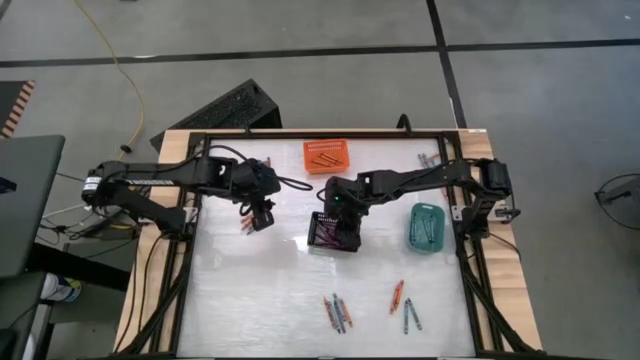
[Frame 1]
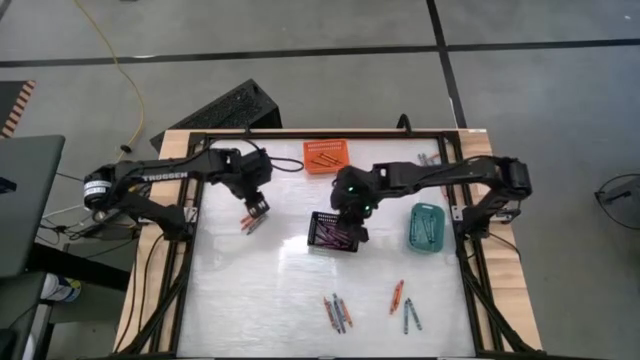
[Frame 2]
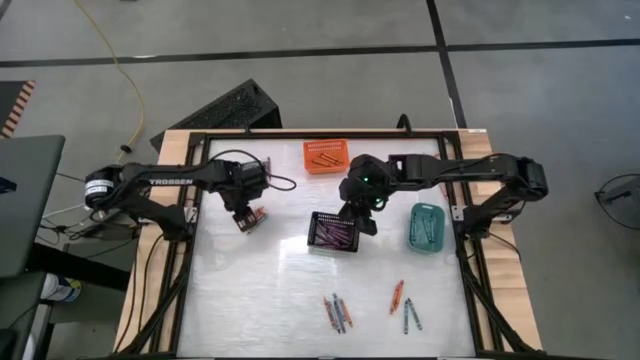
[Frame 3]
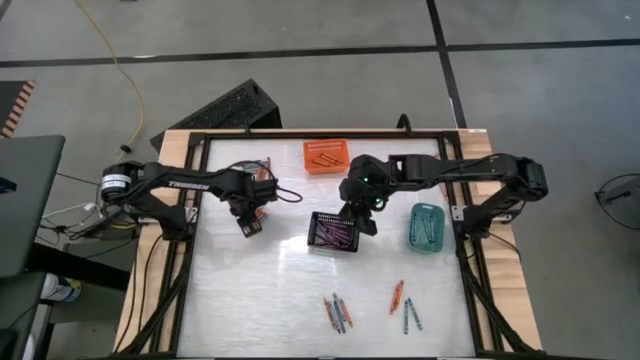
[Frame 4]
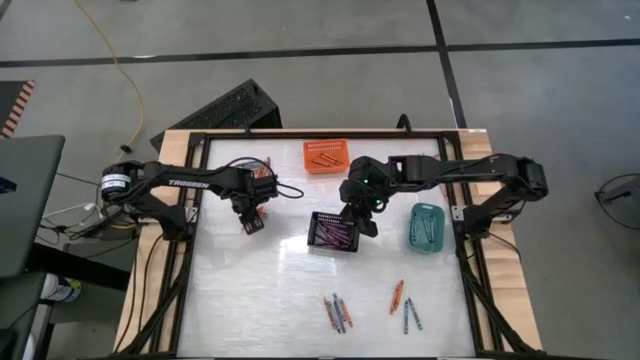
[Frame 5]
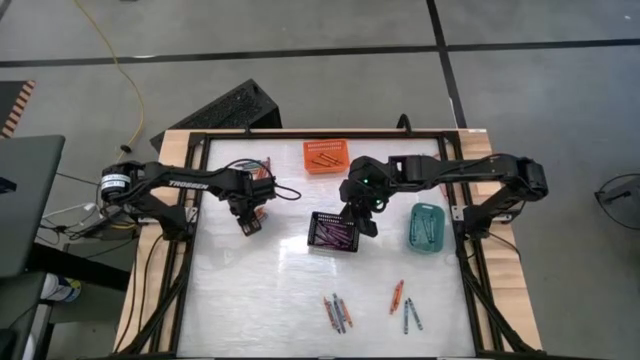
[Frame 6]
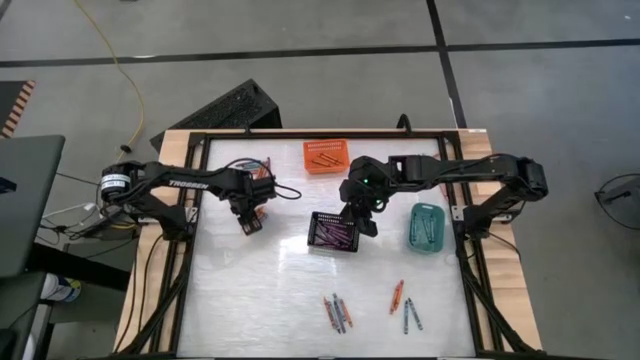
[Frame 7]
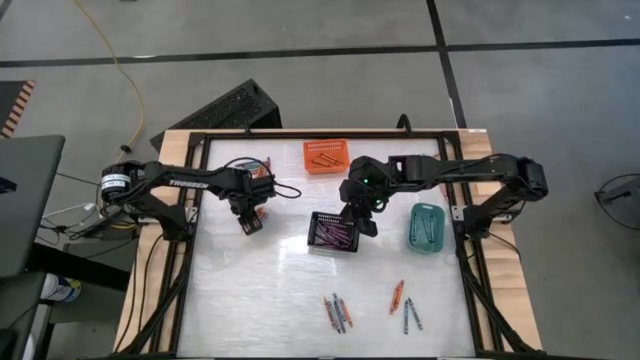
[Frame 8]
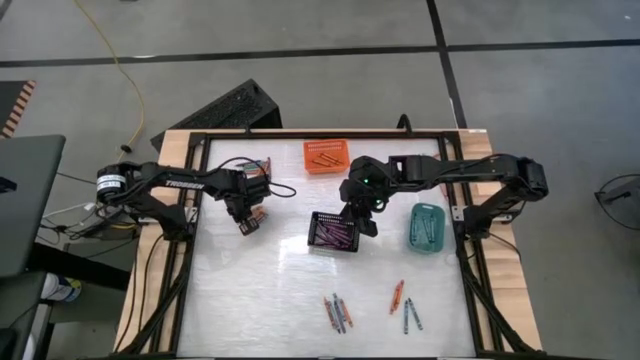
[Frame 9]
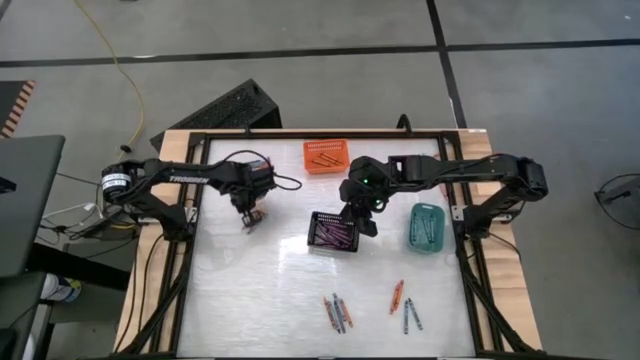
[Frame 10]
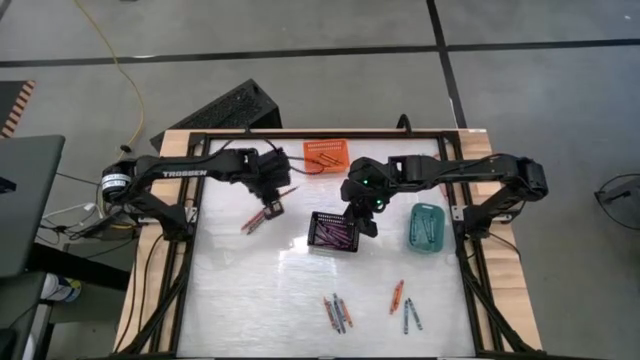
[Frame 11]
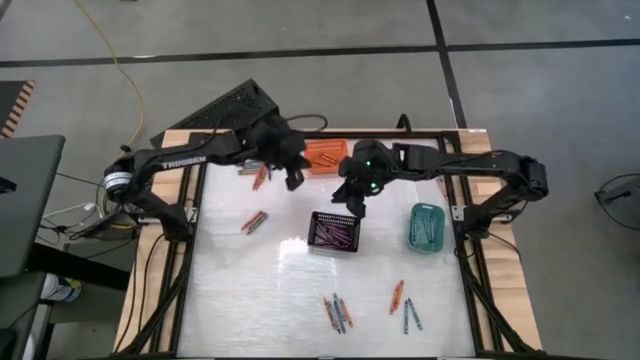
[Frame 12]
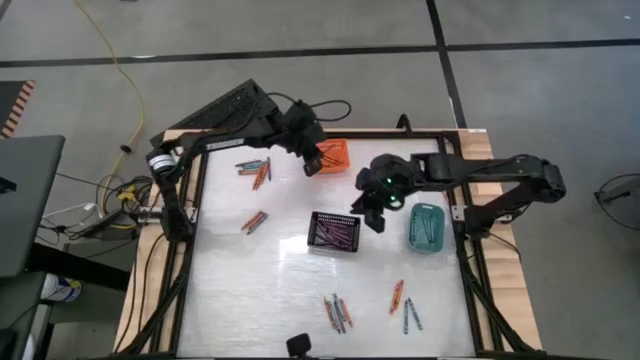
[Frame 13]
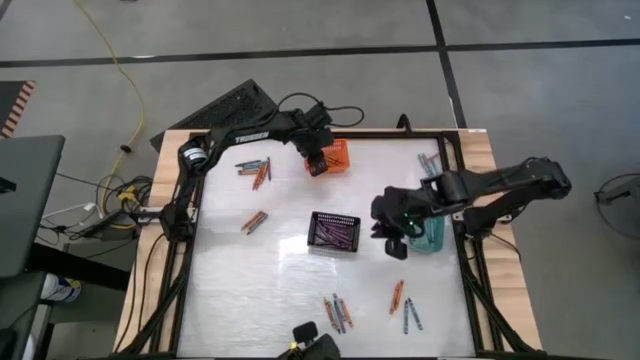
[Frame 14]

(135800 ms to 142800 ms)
Task: Sort crayons
Put the orange crayon into the orange bin

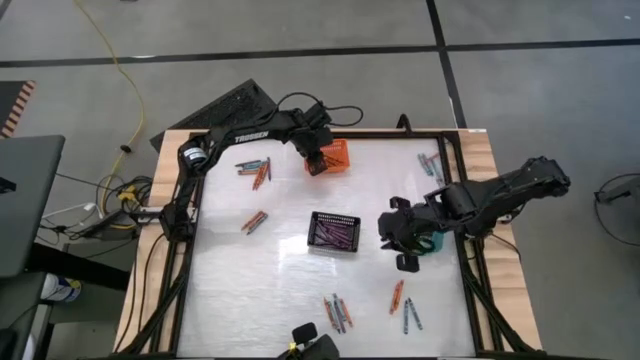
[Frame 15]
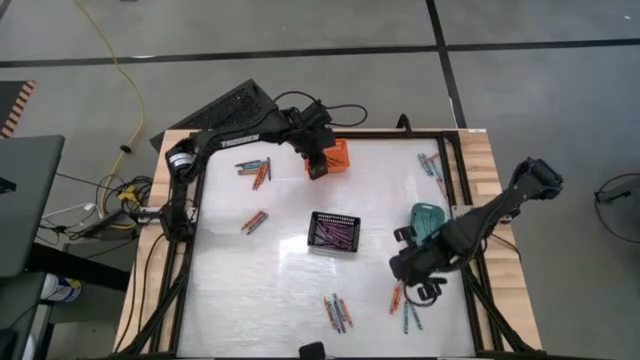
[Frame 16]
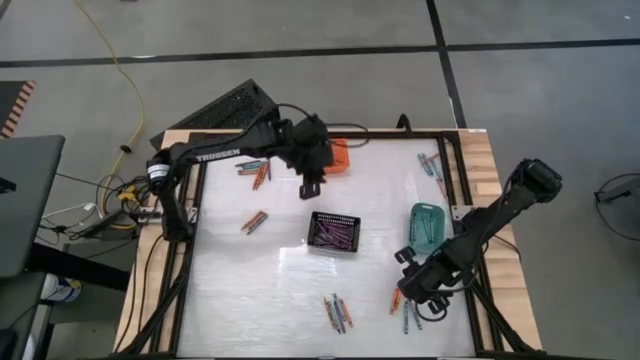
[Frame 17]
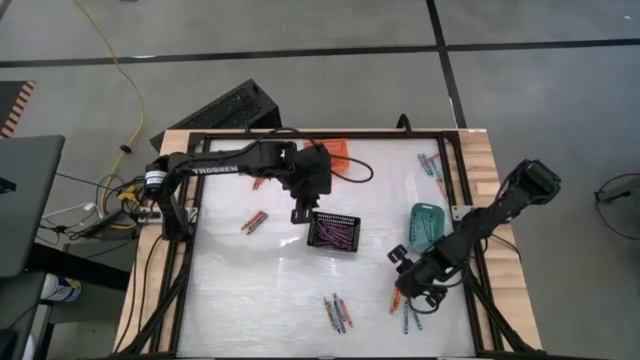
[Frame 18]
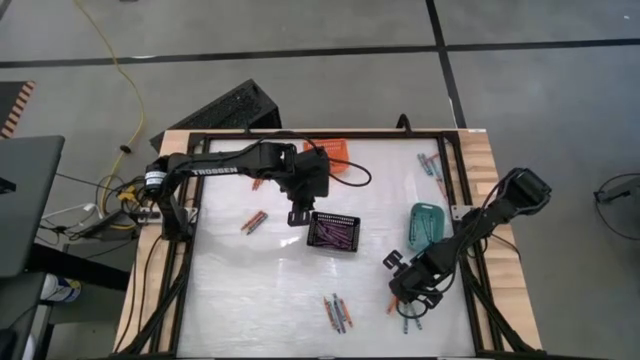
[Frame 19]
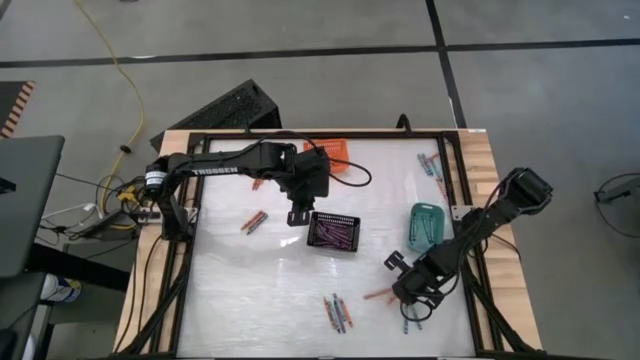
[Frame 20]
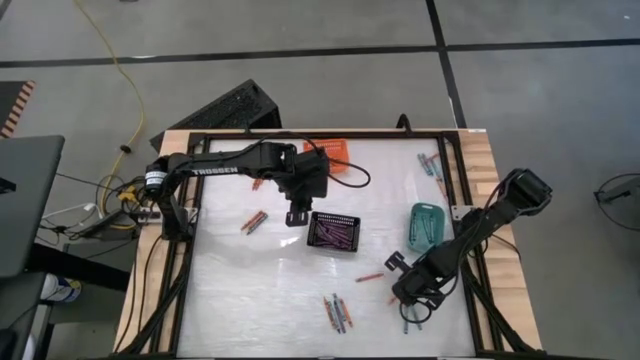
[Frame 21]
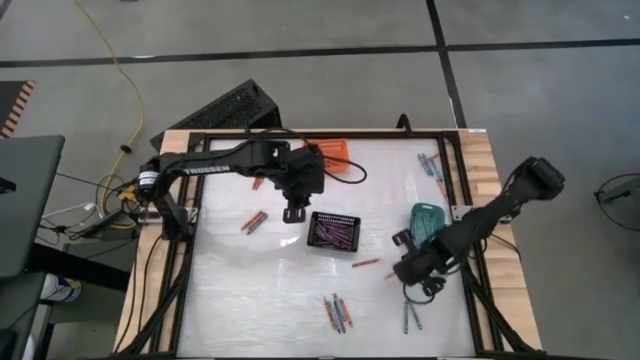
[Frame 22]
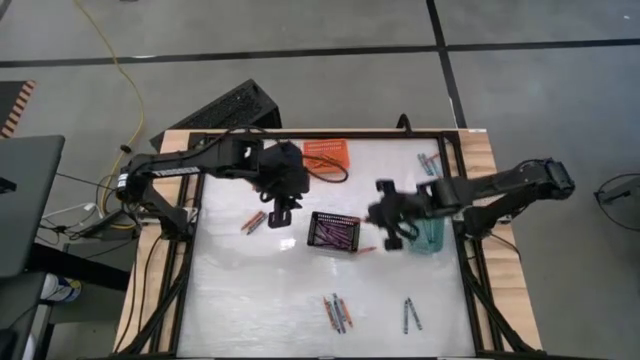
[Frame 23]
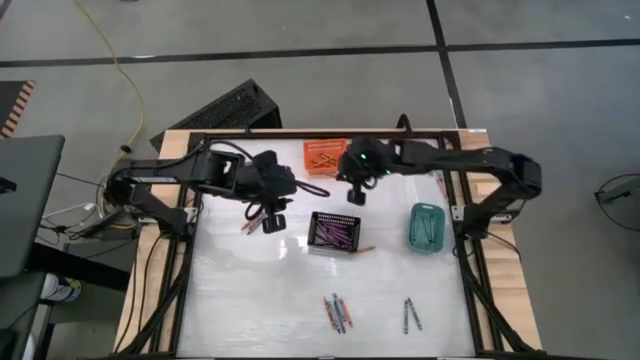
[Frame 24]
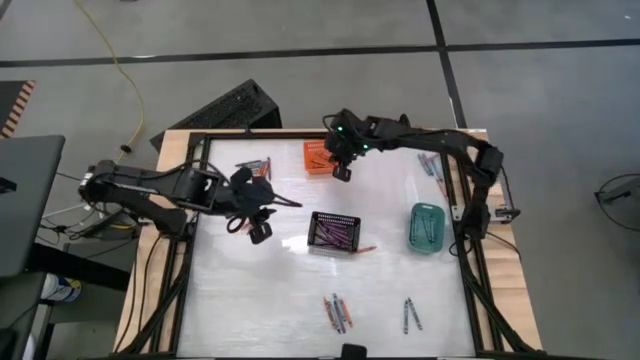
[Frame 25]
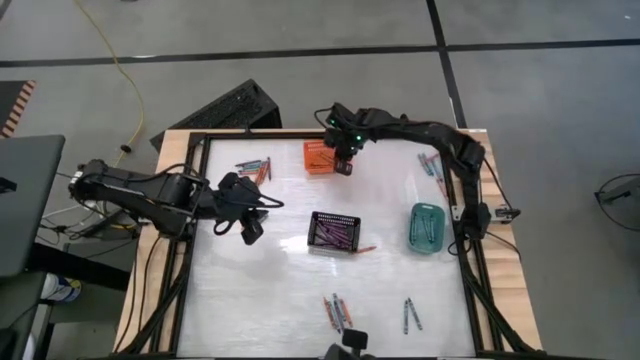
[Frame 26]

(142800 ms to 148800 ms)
Put the orange crayon into the orange bin

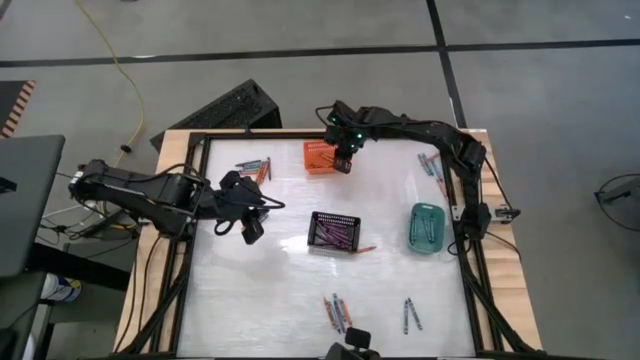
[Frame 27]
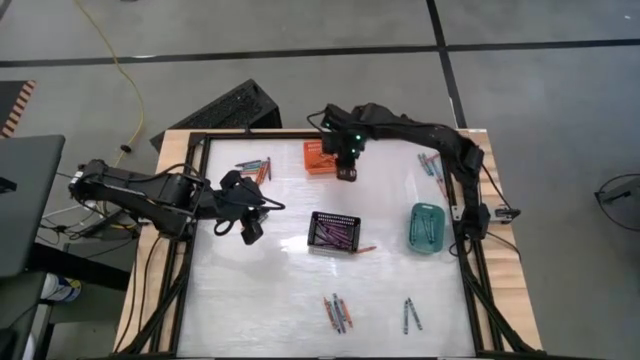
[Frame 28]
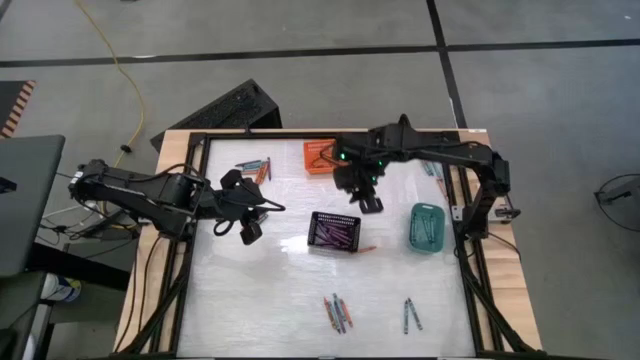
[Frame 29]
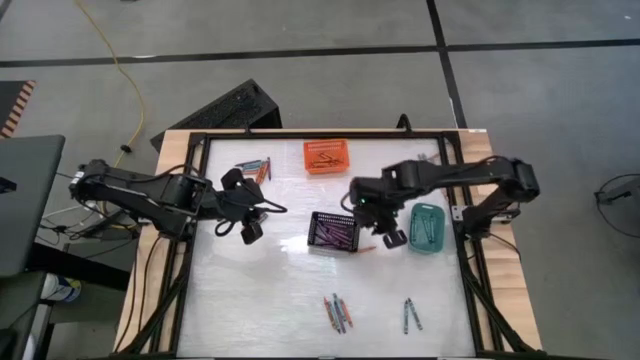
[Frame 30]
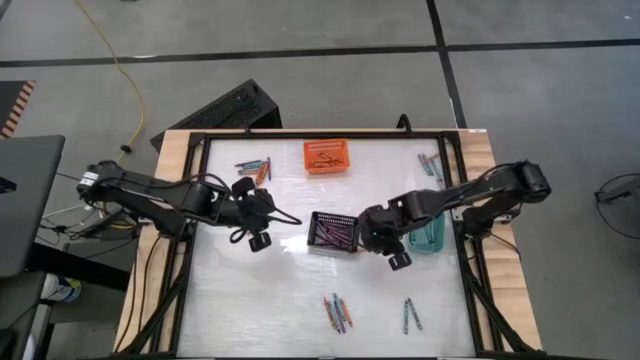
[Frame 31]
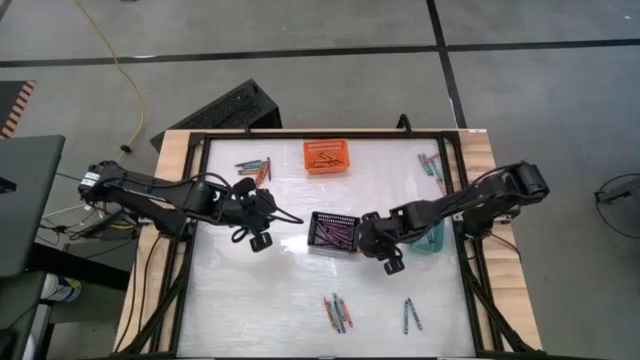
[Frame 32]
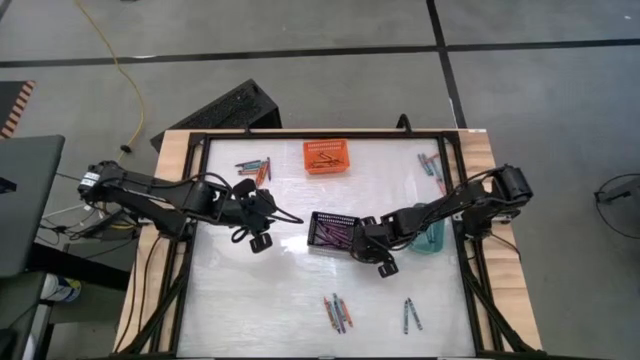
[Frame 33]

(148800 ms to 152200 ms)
Put the orange crayon into the orange bin

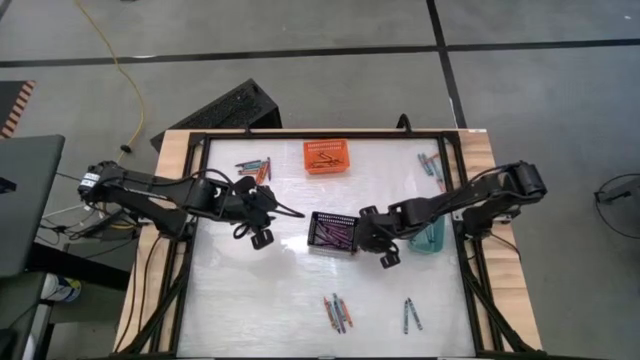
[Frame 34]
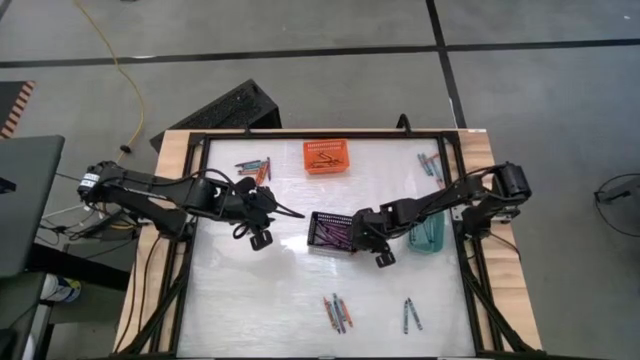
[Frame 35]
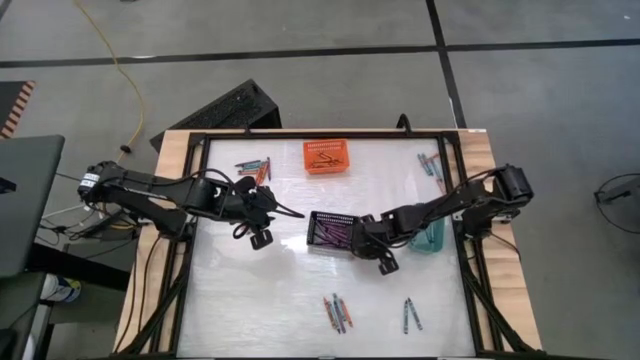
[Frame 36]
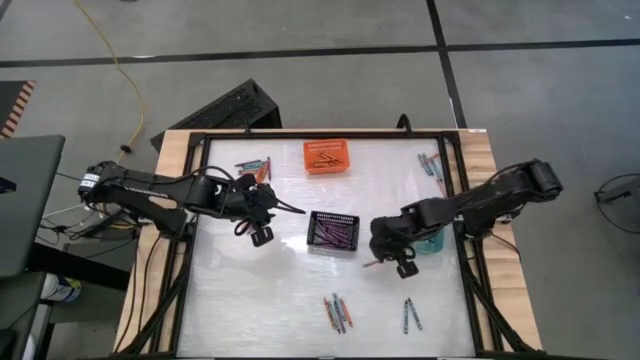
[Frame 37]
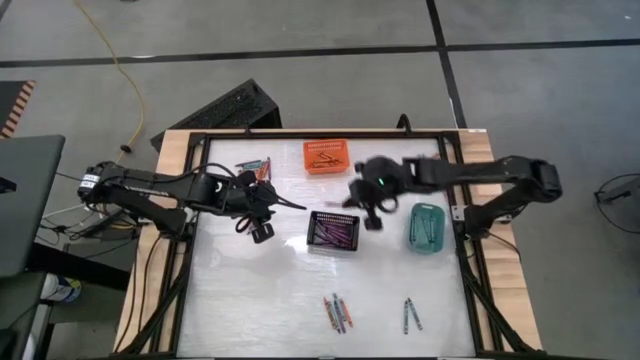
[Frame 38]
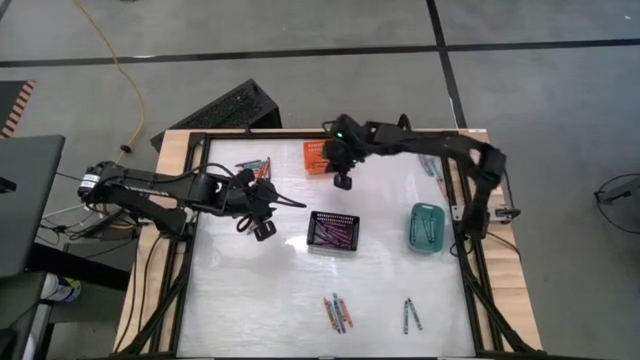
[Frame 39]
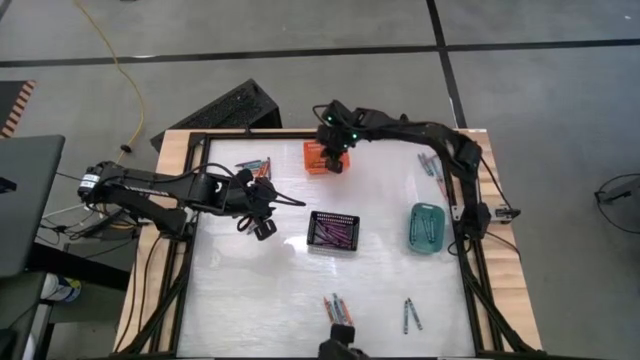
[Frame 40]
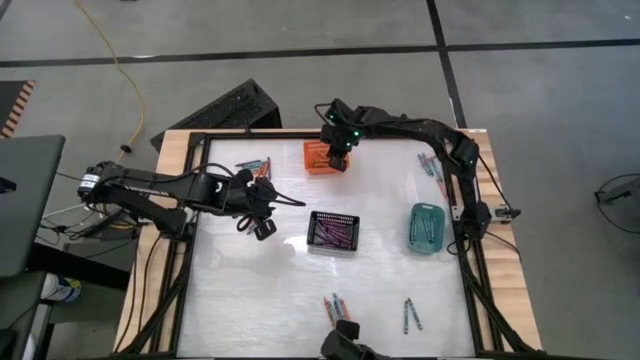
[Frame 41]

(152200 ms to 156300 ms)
Put the orange crayon into the orange bin

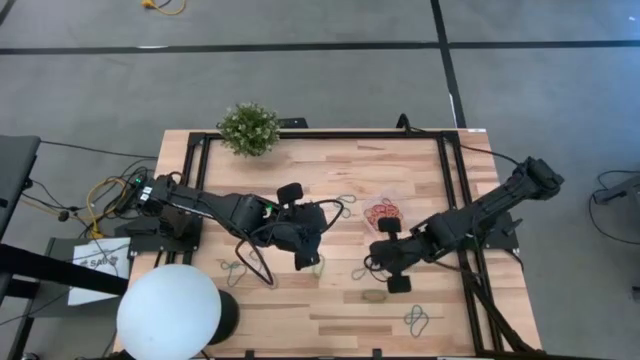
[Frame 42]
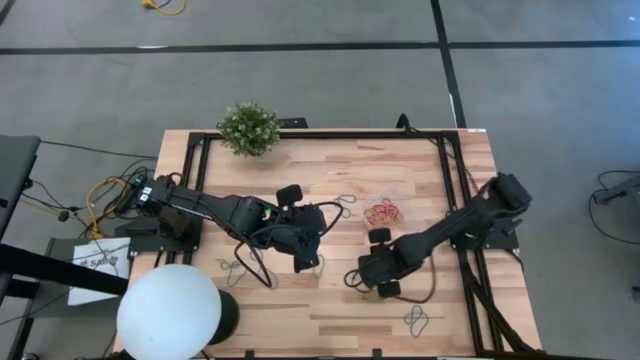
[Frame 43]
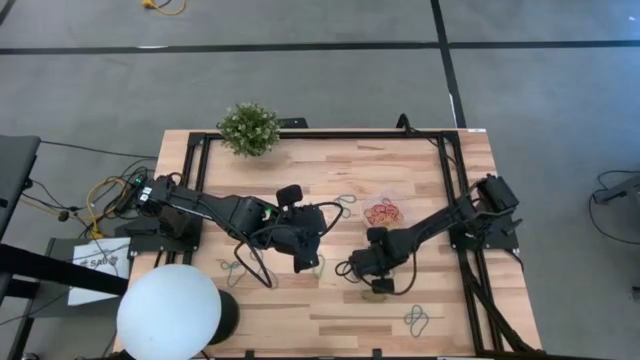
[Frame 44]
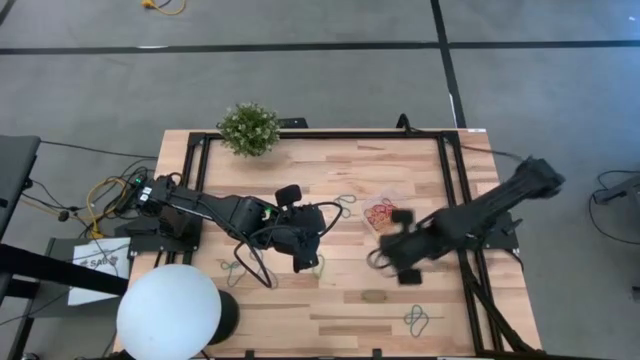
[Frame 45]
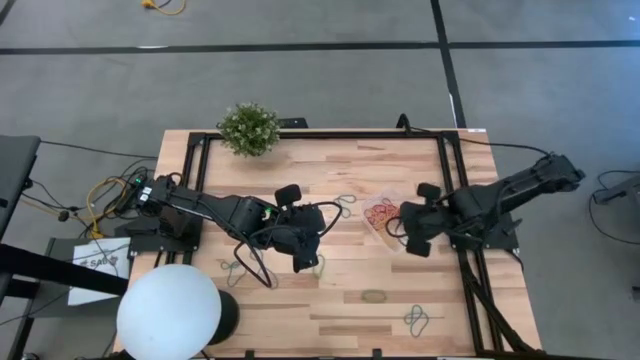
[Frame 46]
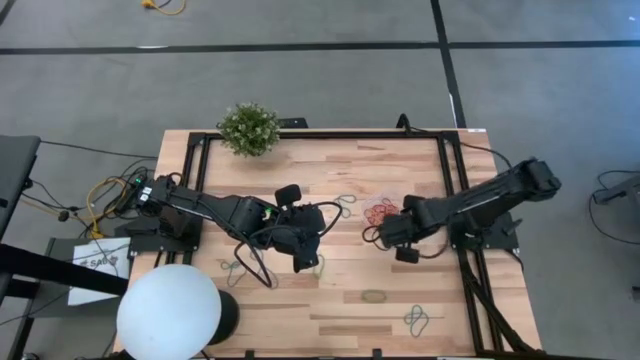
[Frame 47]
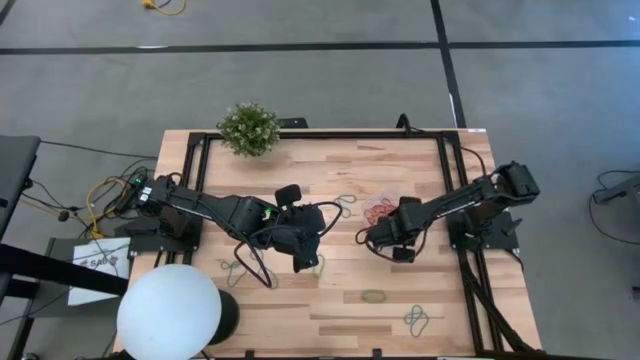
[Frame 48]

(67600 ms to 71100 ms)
Task: Pick and place items into bin
Put the blue rubber band into the transparent bin
